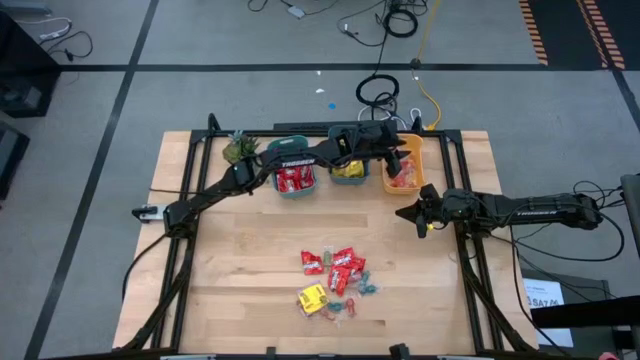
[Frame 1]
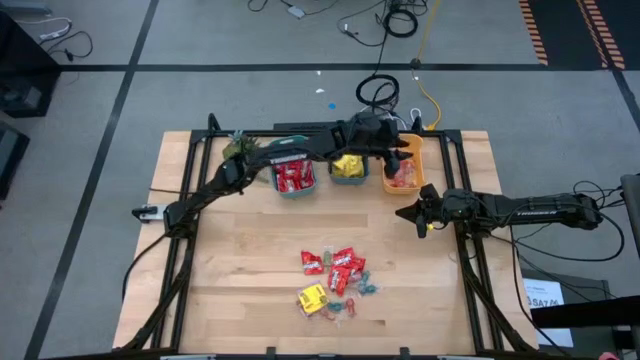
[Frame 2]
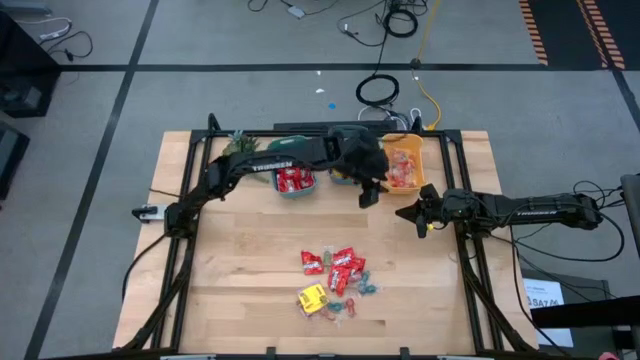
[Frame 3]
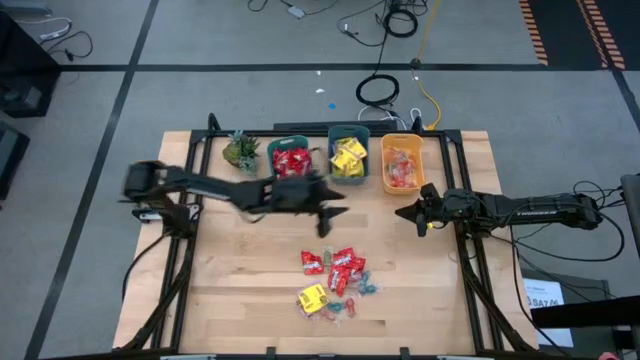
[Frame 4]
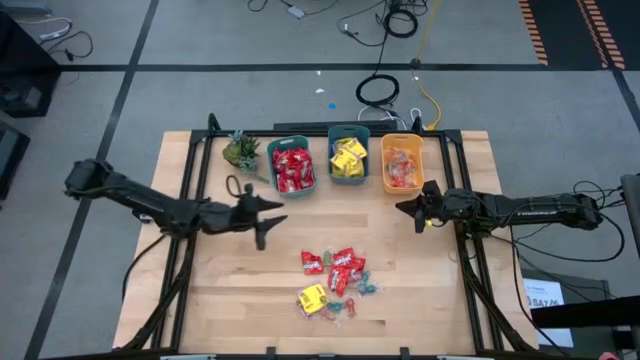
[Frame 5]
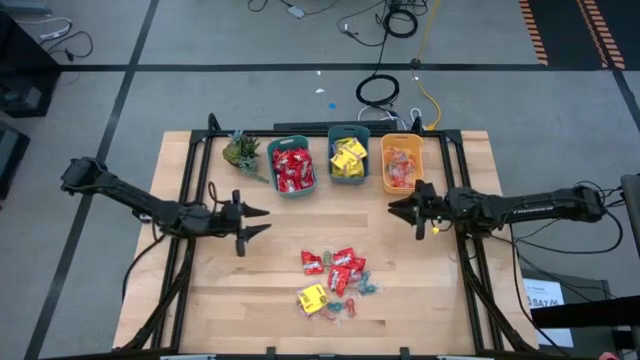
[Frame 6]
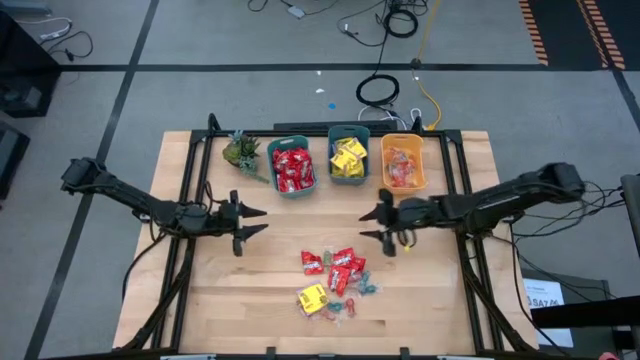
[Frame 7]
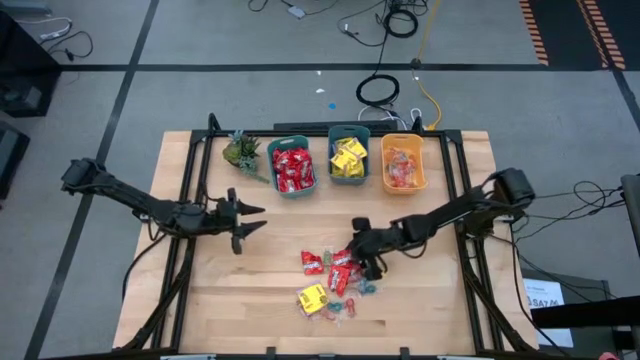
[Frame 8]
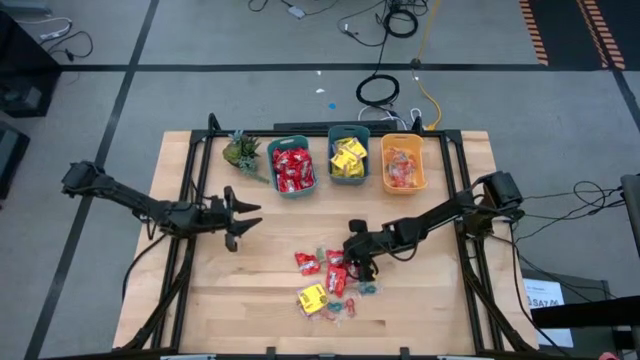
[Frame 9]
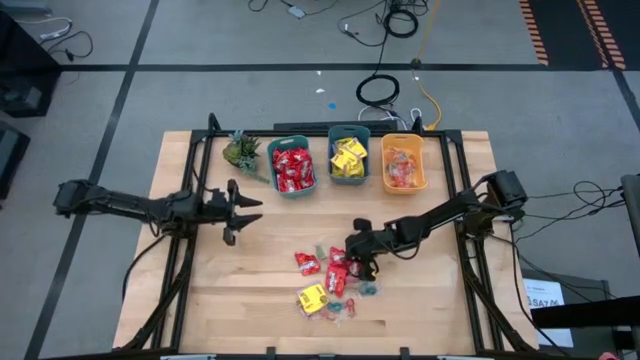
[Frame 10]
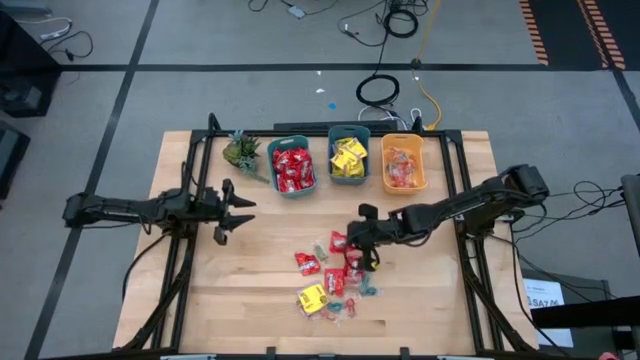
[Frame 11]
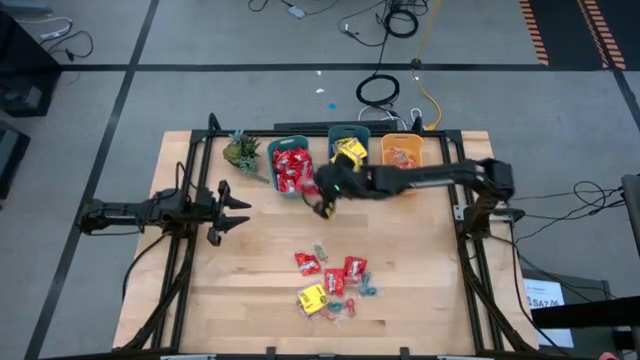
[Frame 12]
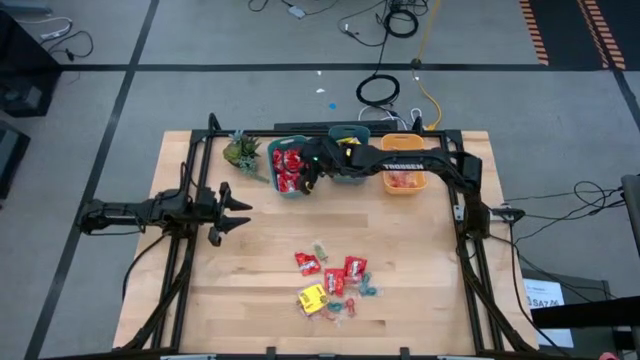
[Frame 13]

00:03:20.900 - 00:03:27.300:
Task: Sort candy
Put the red candy into the green bin

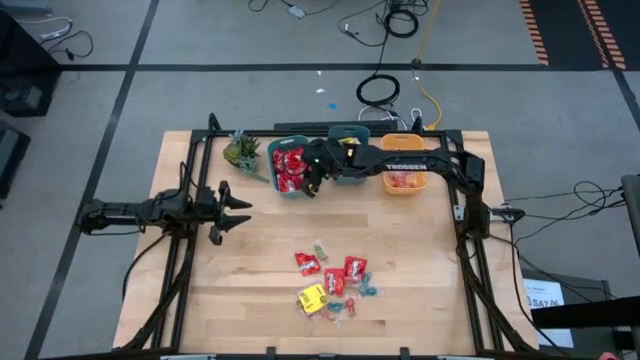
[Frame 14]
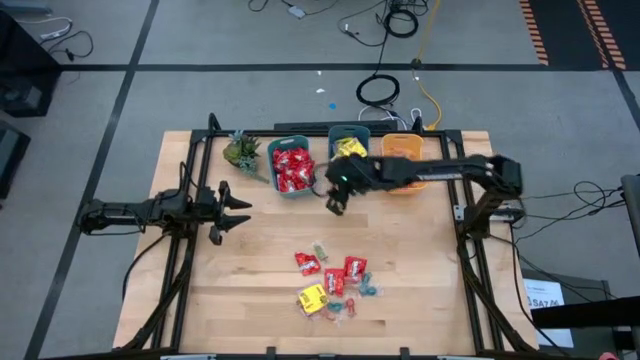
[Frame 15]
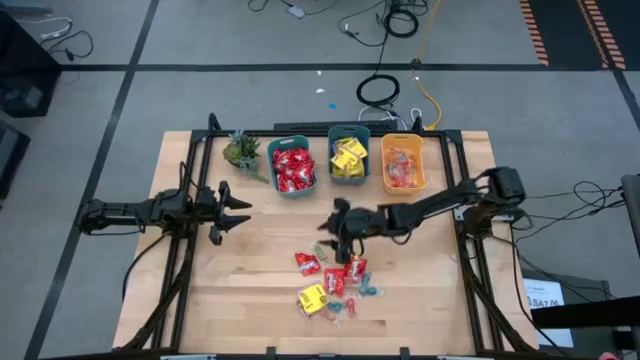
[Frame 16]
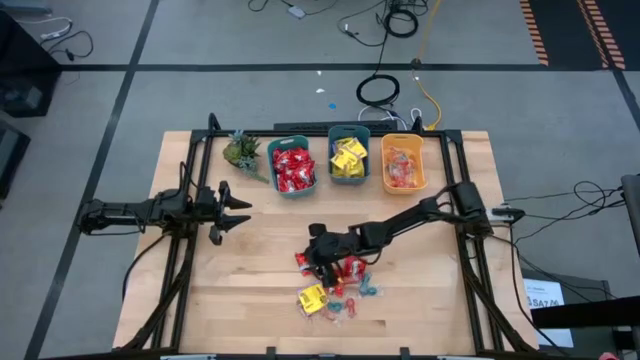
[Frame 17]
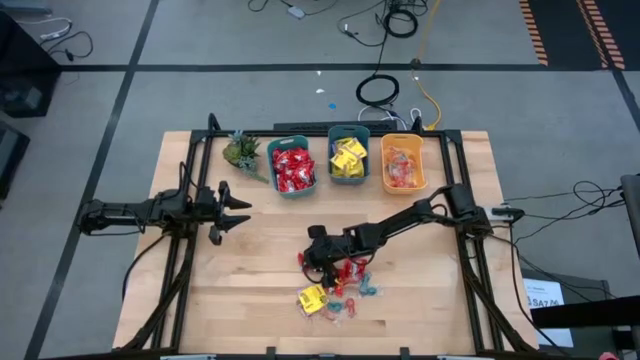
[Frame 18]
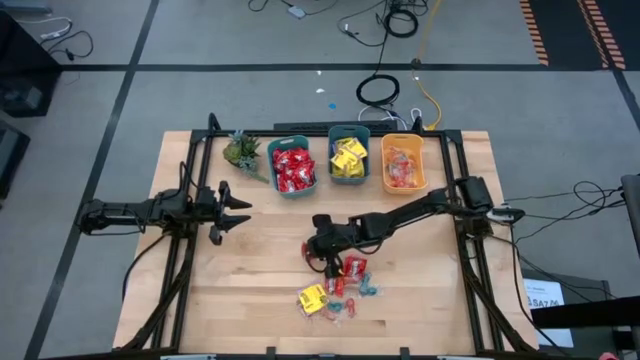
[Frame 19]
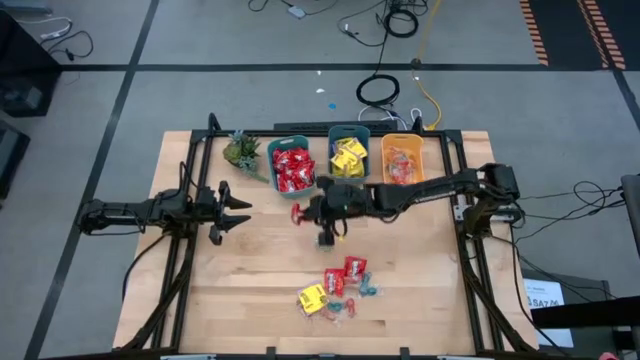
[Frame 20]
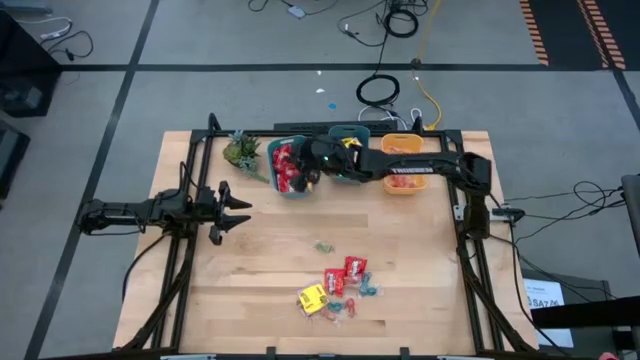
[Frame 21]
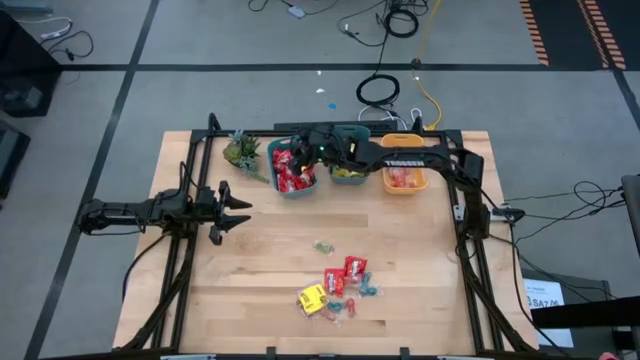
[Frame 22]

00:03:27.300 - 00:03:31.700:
Put the red candy into the green bin

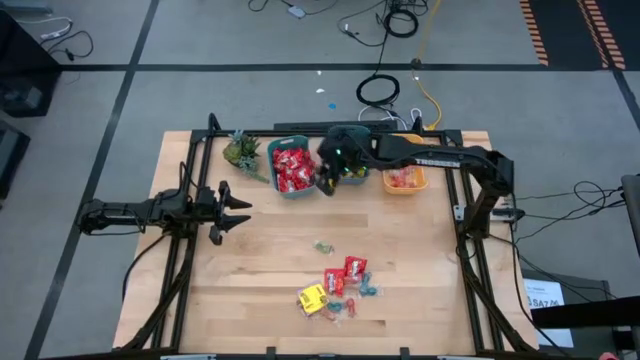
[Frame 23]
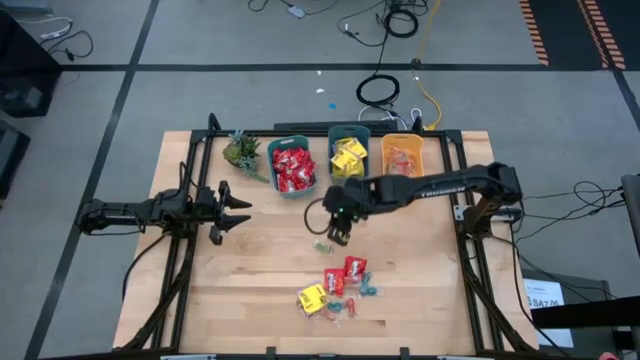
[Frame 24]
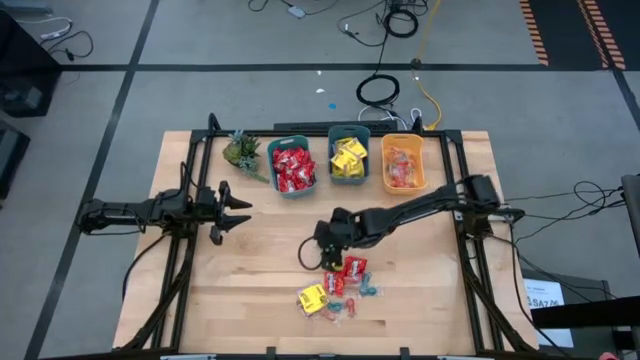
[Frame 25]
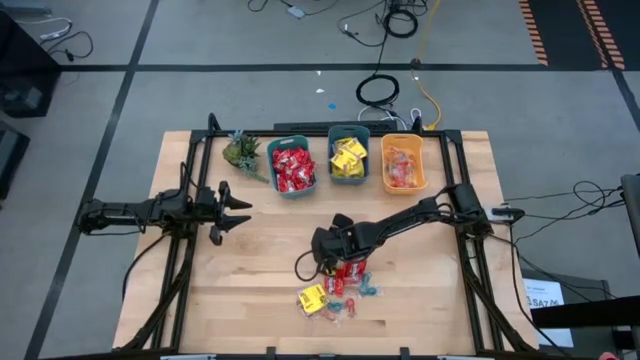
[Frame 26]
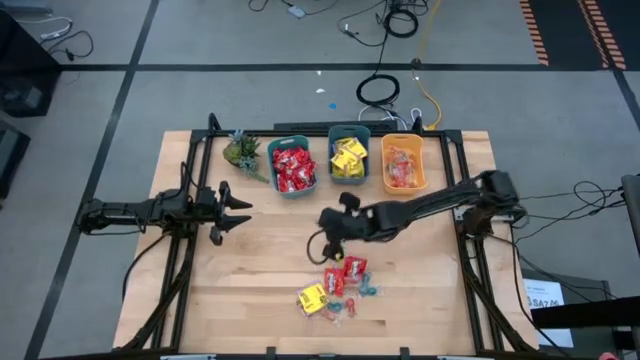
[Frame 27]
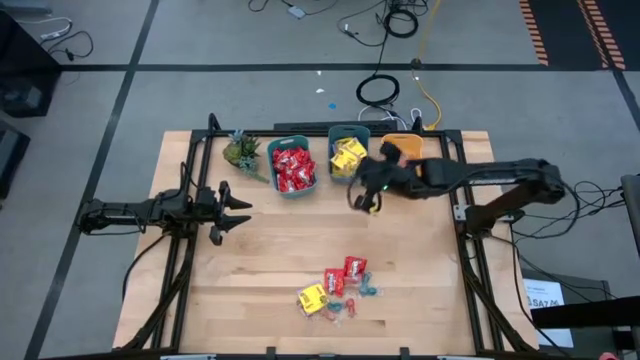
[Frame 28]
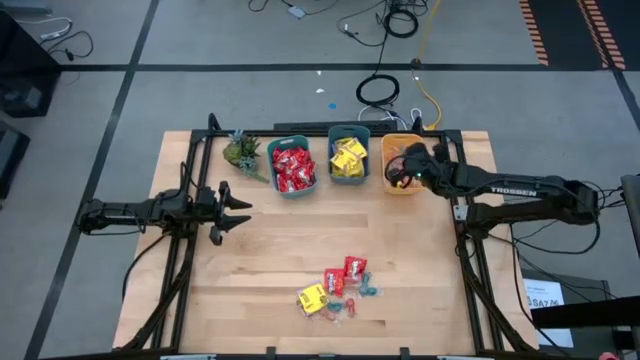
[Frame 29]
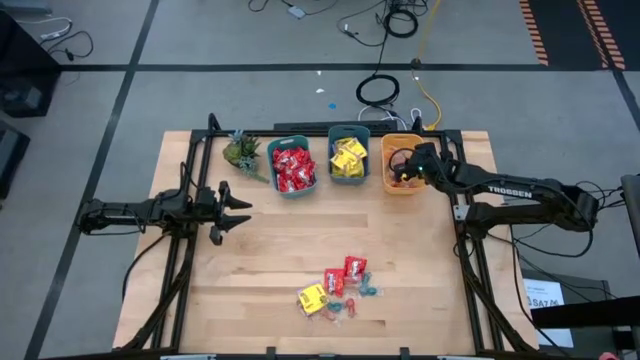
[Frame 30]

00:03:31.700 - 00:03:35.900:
Put the green gummy candy into the yellow bin

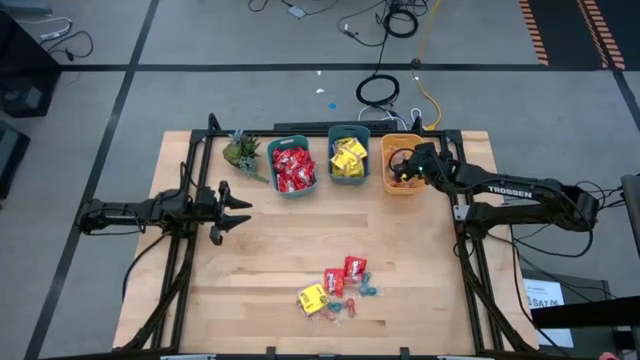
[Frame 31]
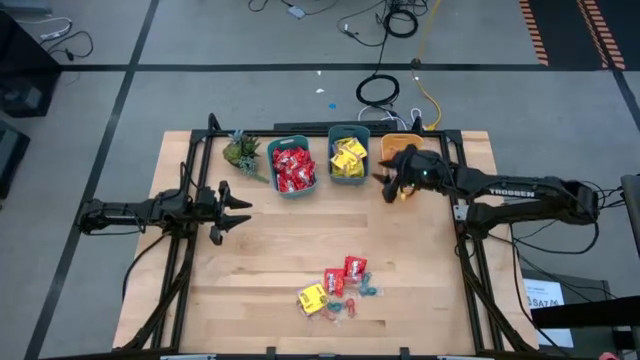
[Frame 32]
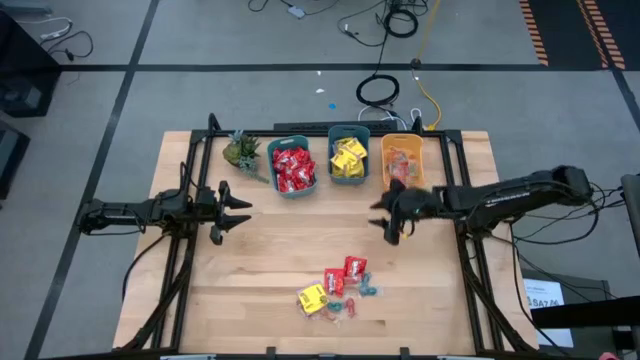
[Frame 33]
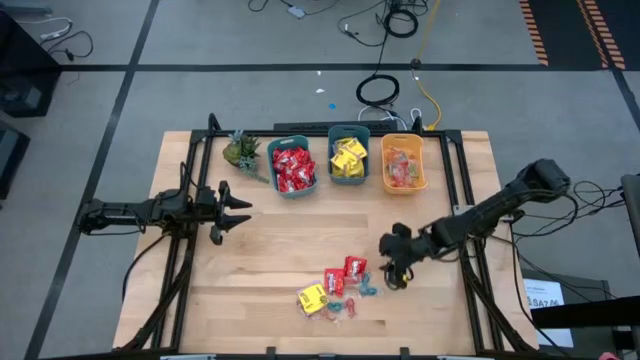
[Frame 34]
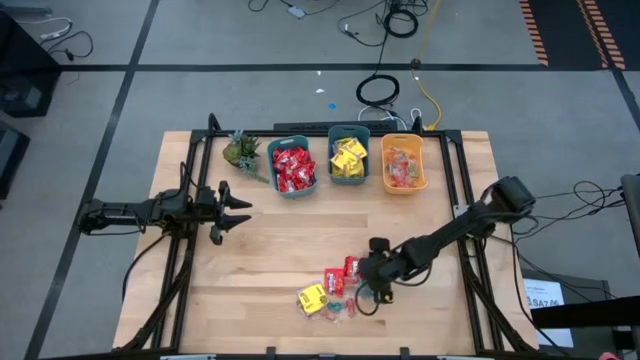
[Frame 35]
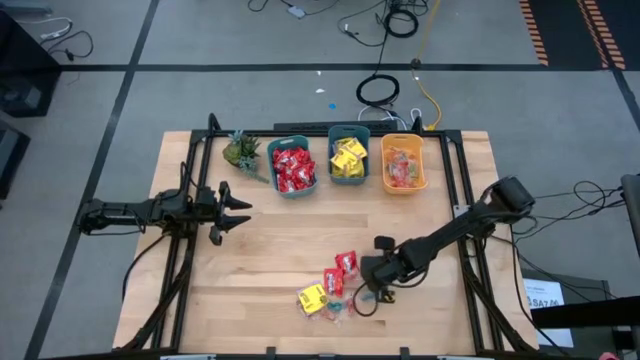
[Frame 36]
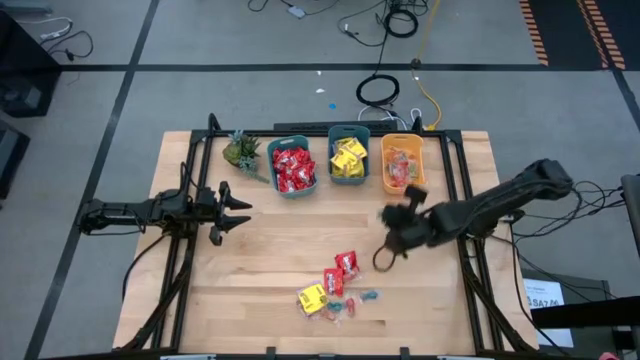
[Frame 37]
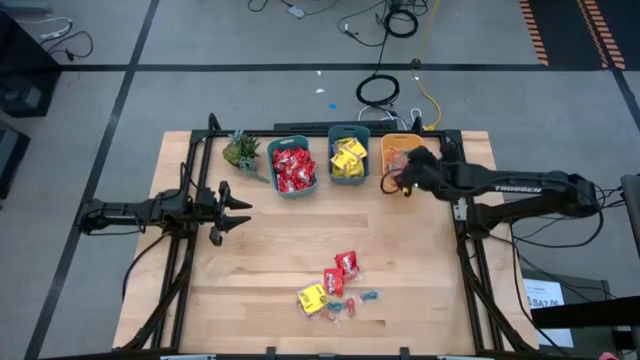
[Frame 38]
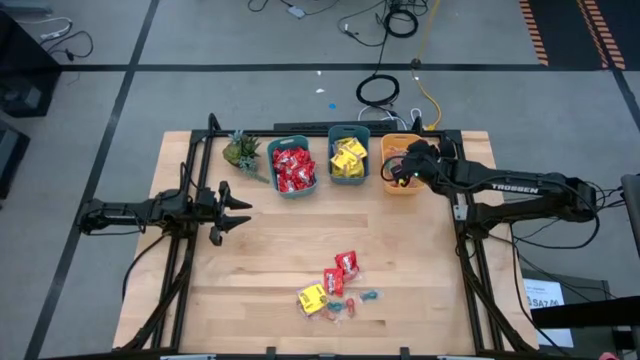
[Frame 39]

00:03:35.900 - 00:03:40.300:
Put the blue gummy candy into the yellow bin

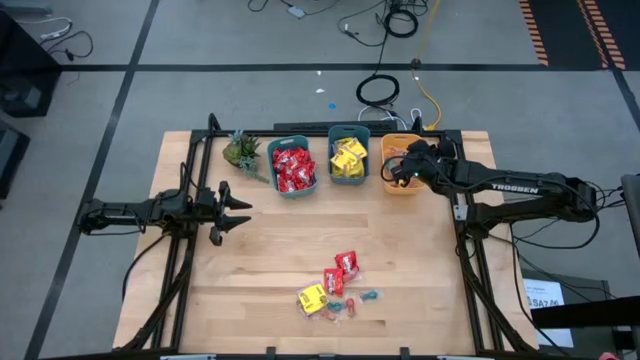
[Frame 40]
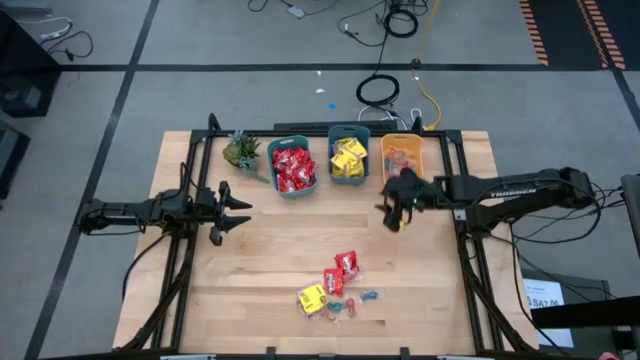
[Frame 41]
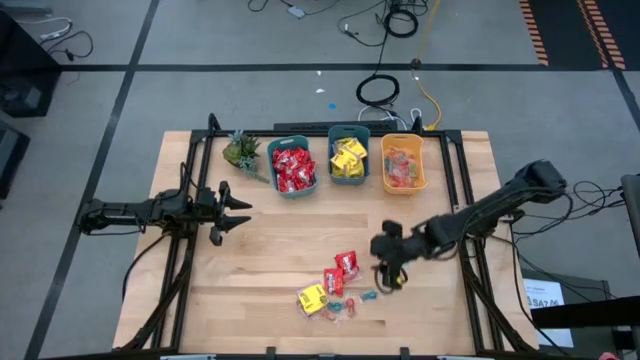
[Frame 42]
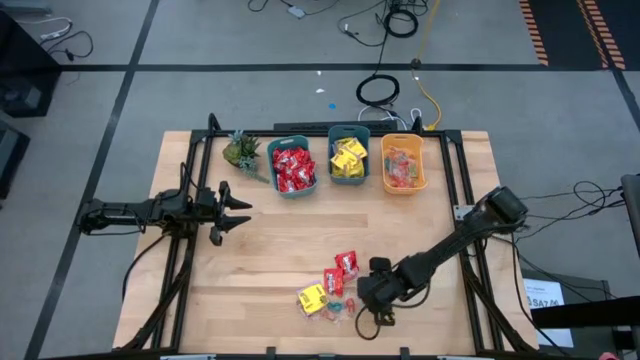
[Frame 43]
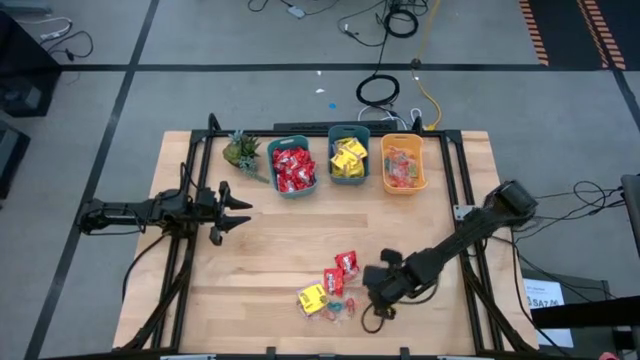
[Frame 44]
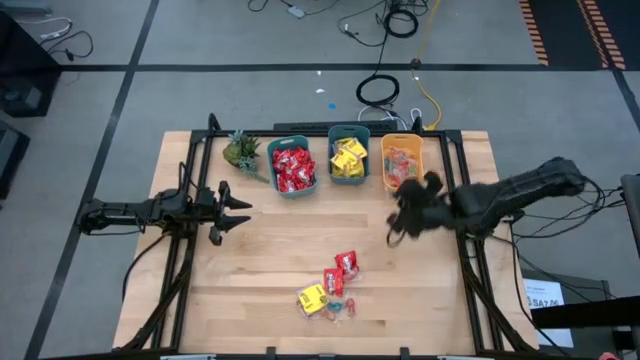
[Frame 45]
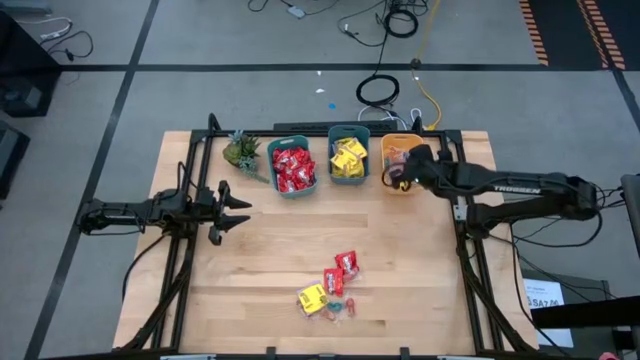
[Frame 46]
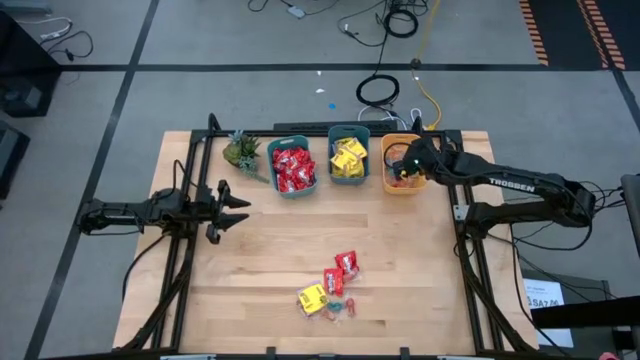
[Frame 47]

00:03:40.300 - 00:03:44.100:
Put the blue gummy candy into the yellow bin
